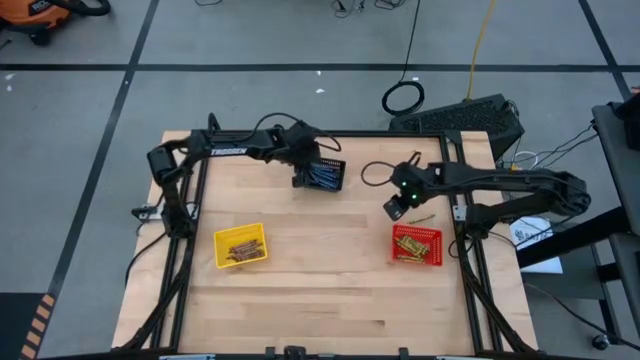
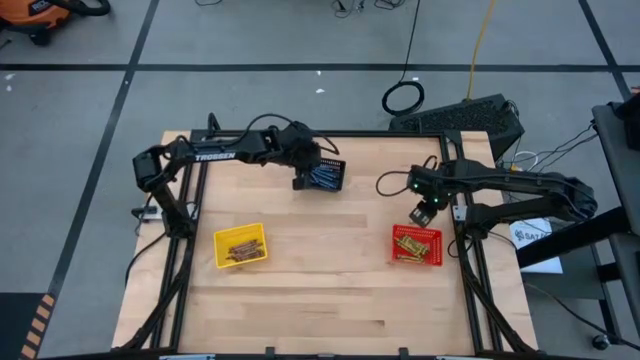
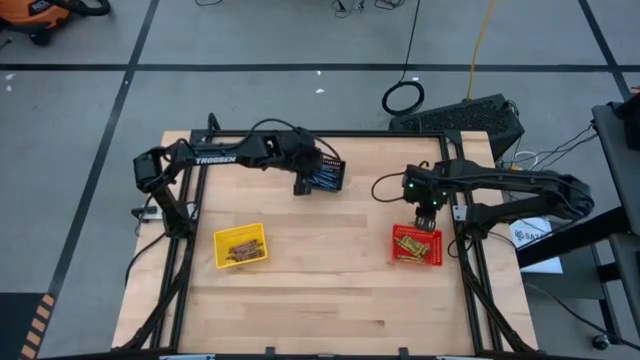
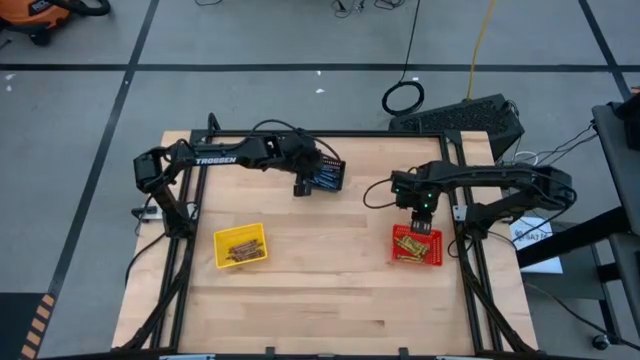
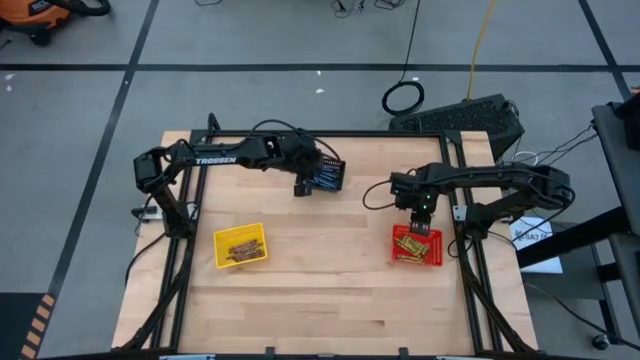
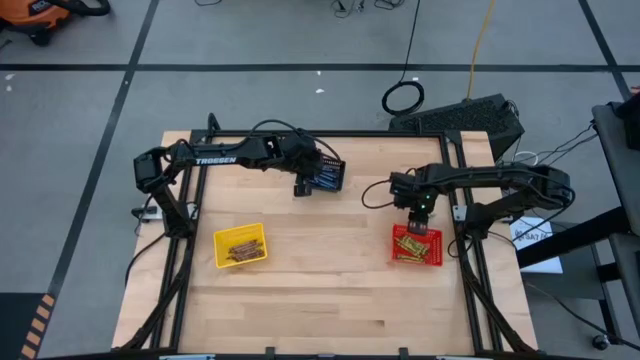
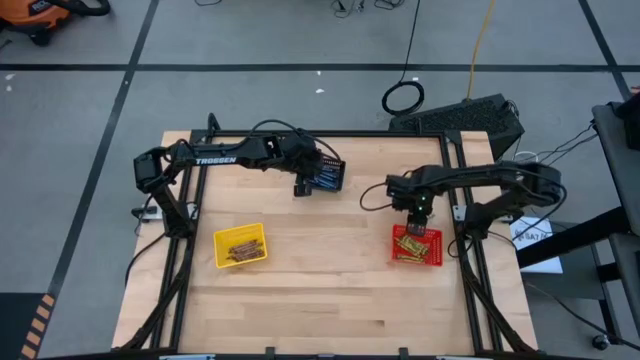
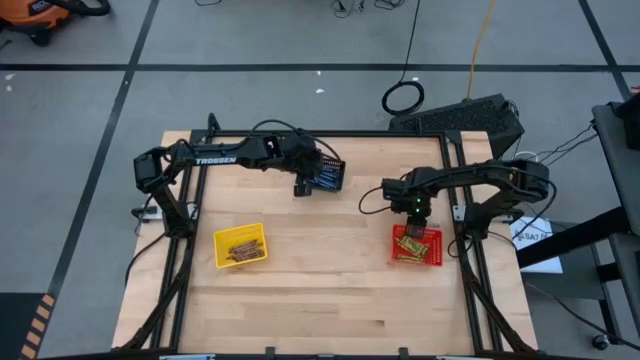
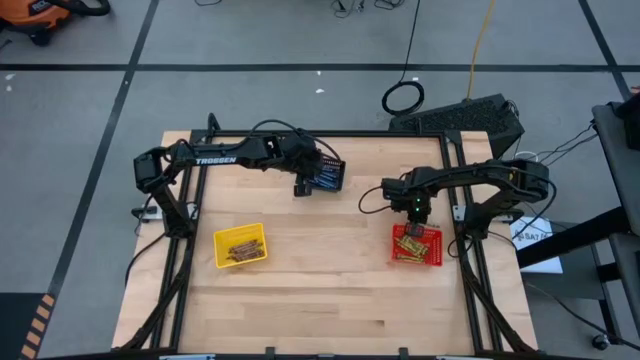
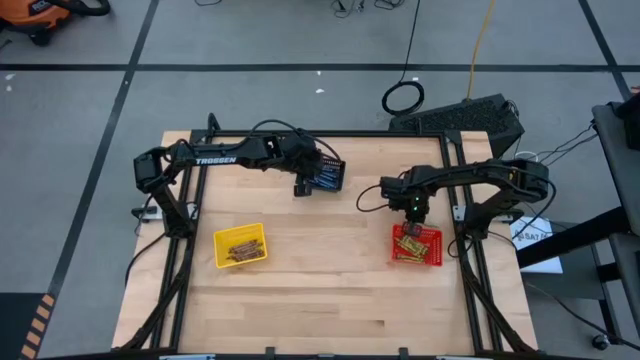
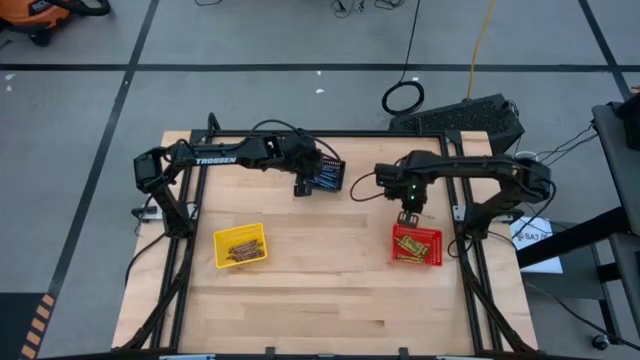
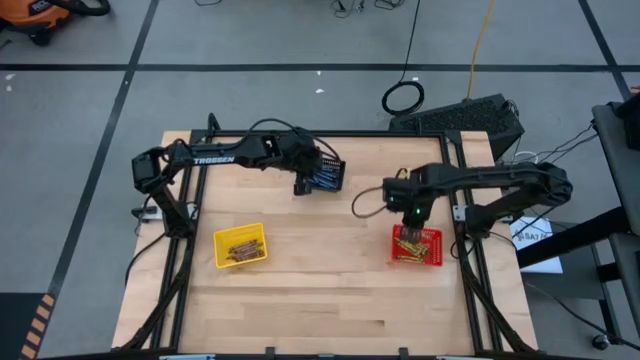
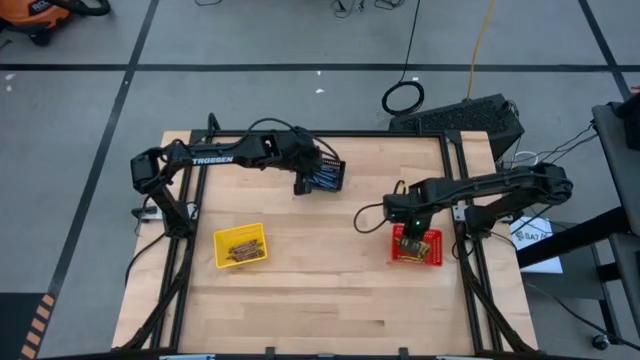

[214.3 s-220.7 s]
Task: Sort crayons
Put the green crayon into the red bin

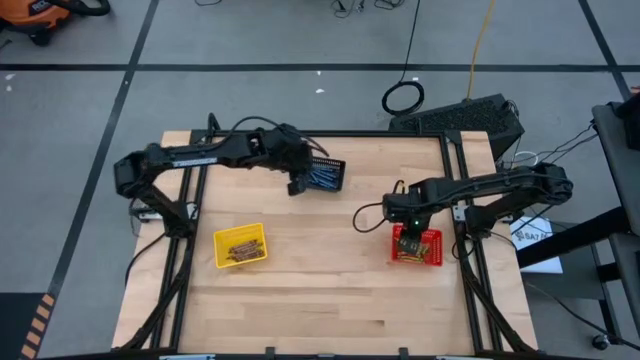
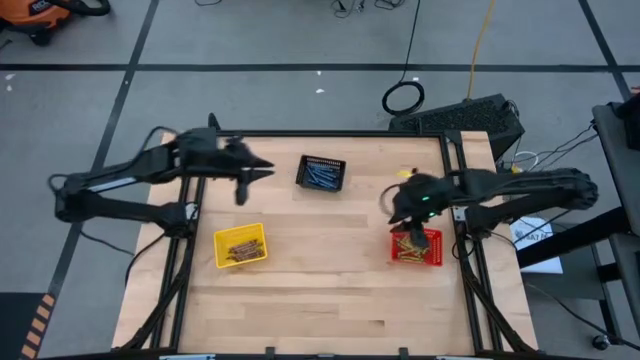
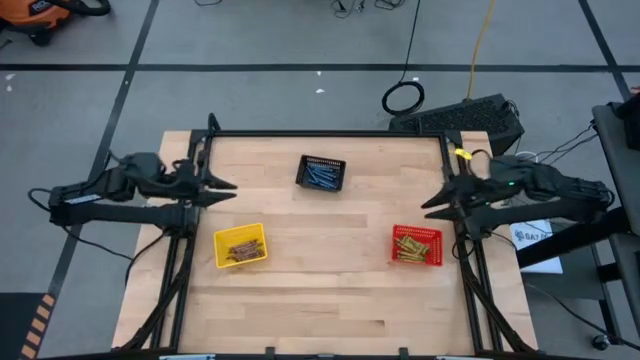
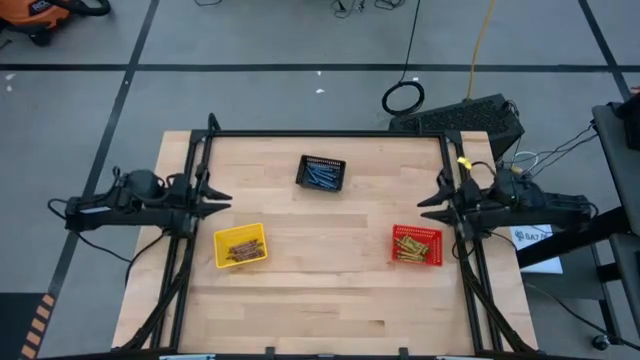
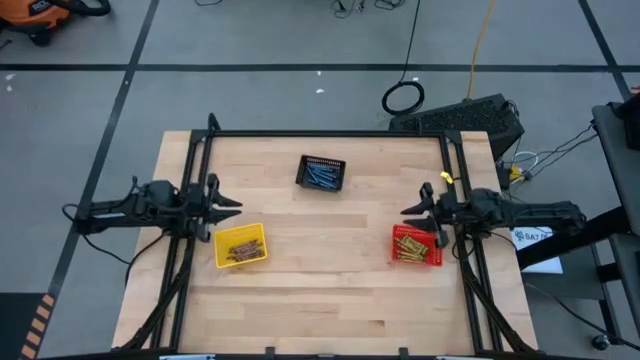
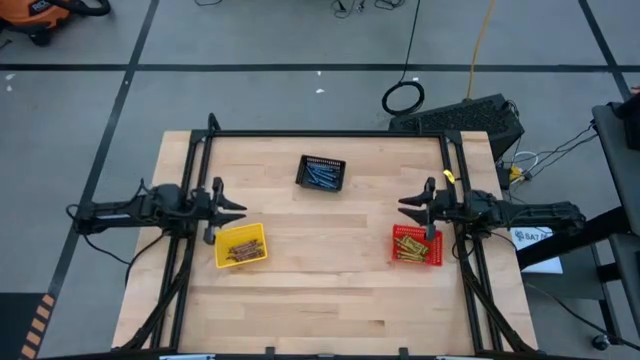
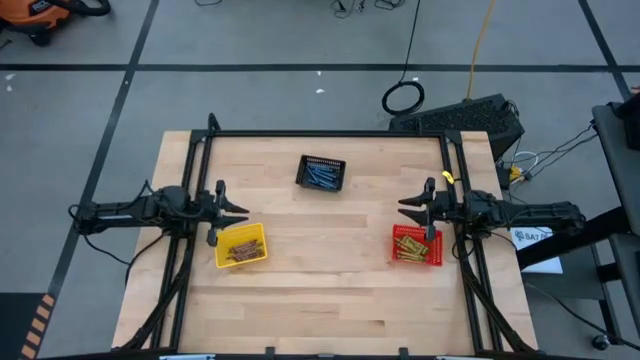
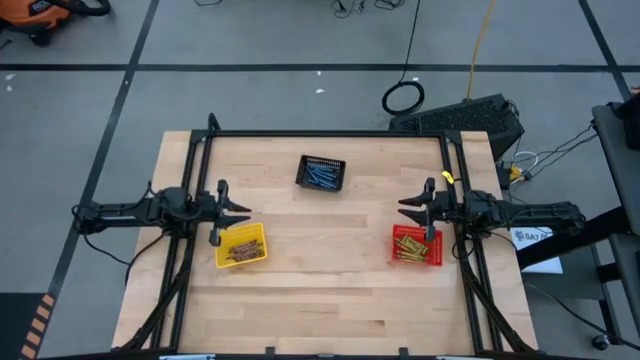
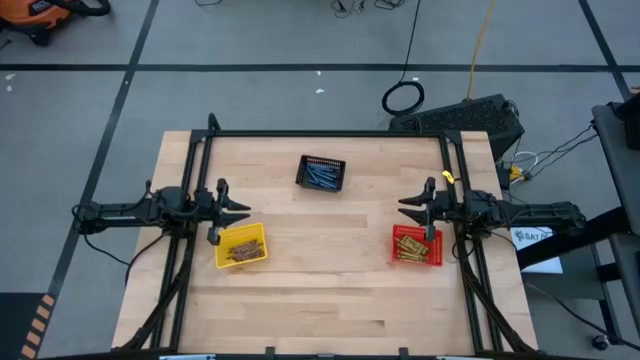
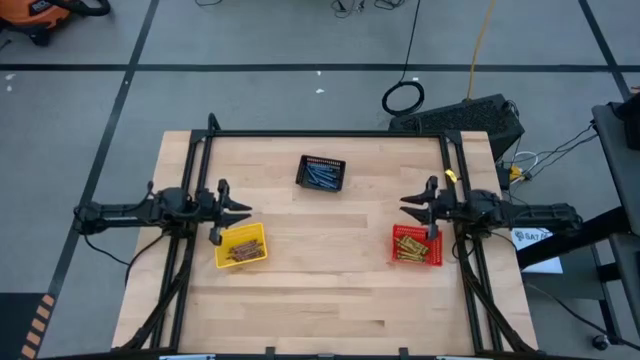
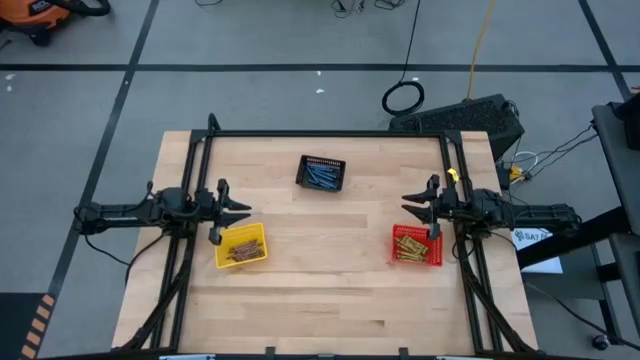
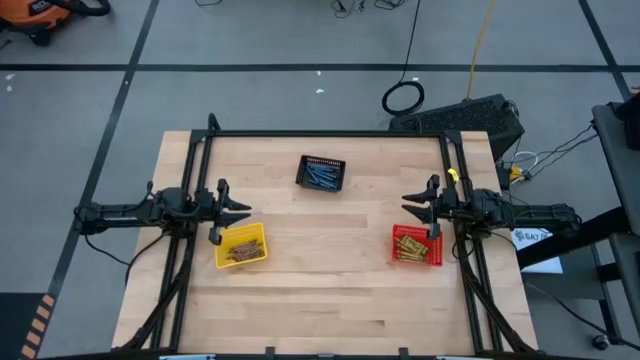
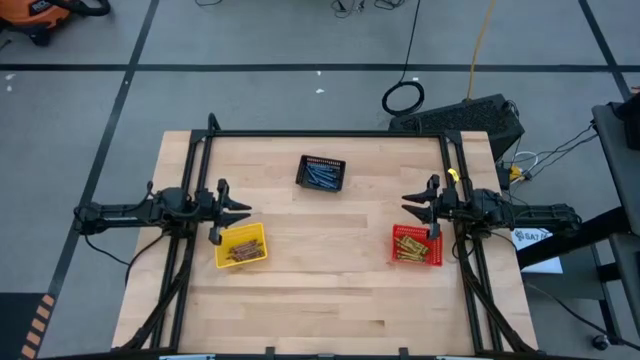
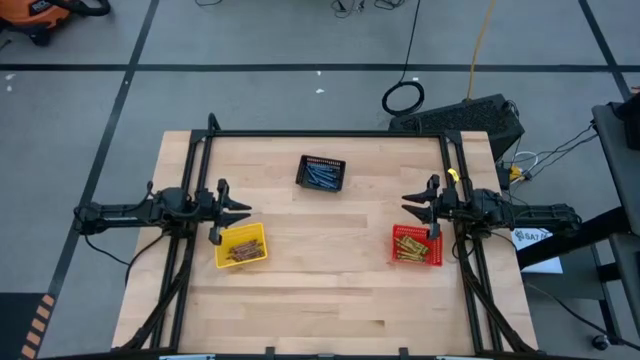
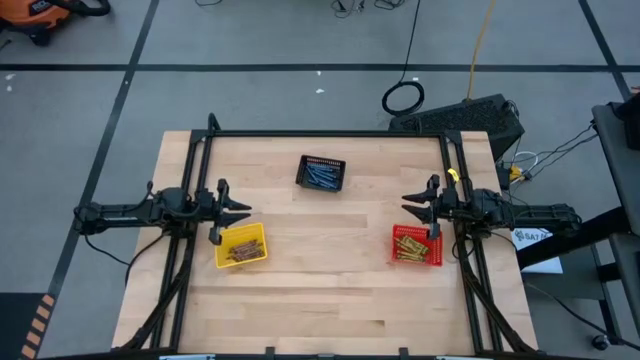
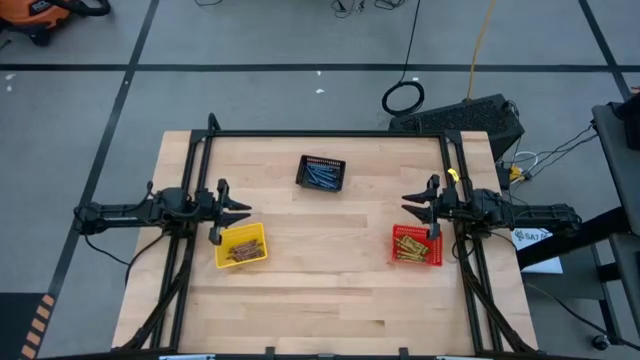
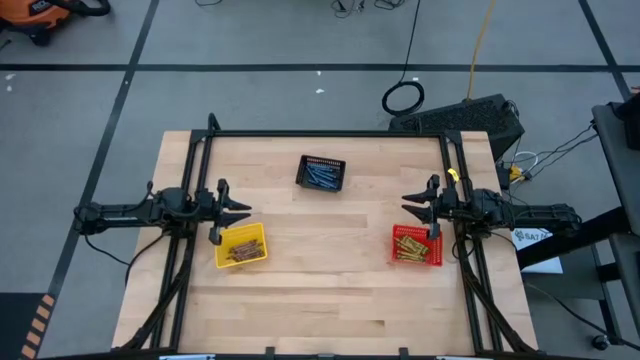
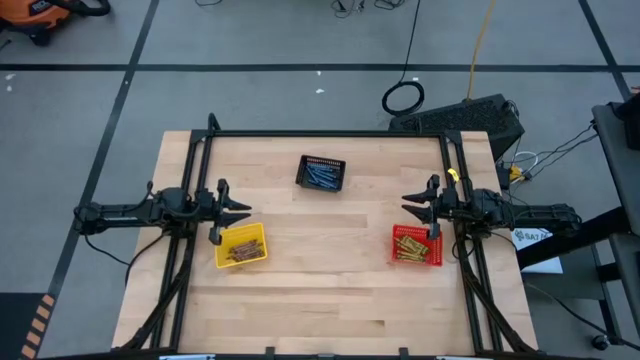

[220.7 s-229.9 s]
Return to Home Position

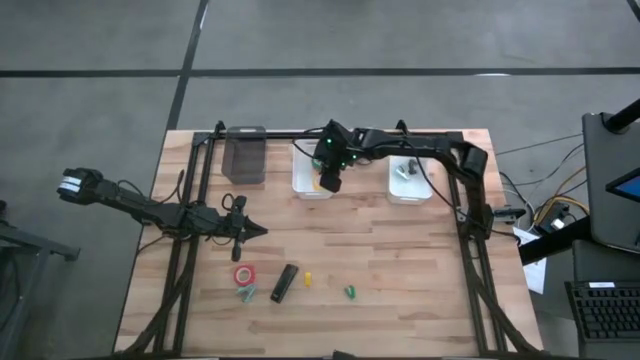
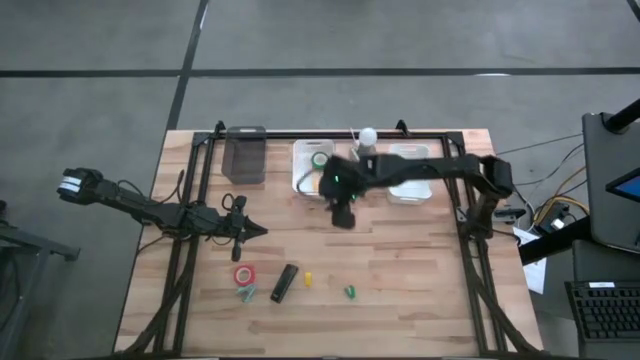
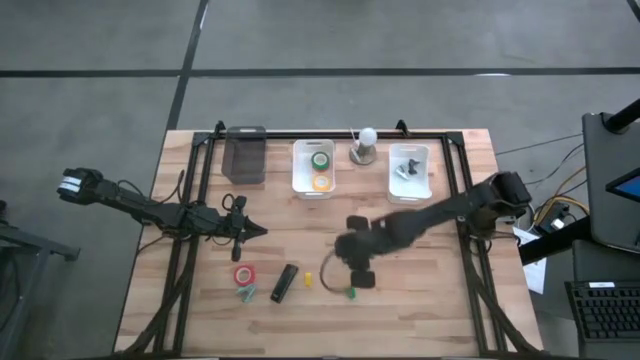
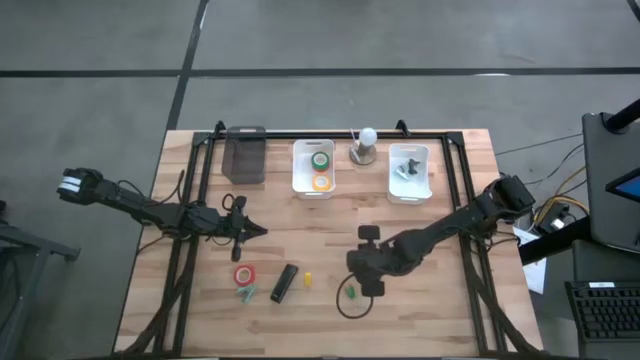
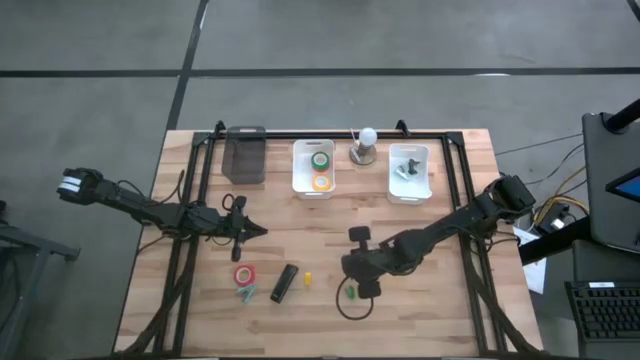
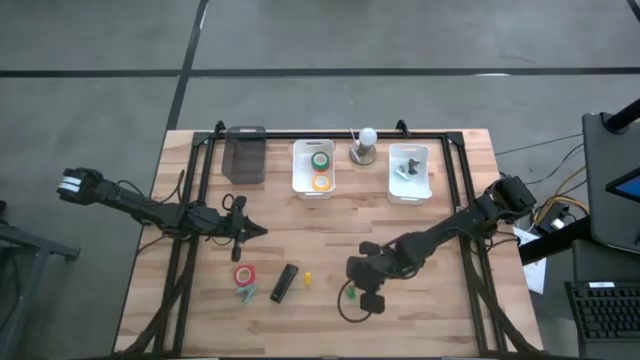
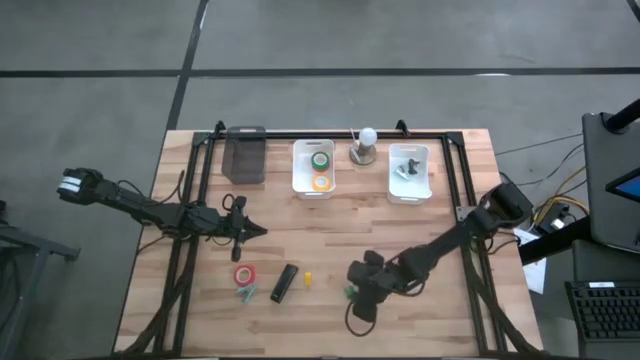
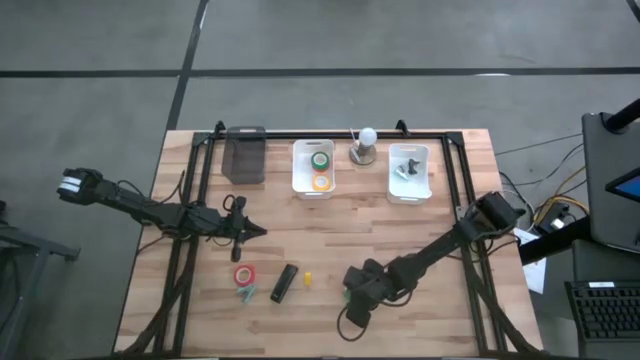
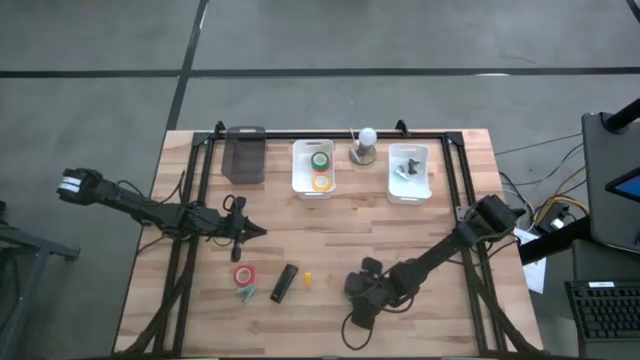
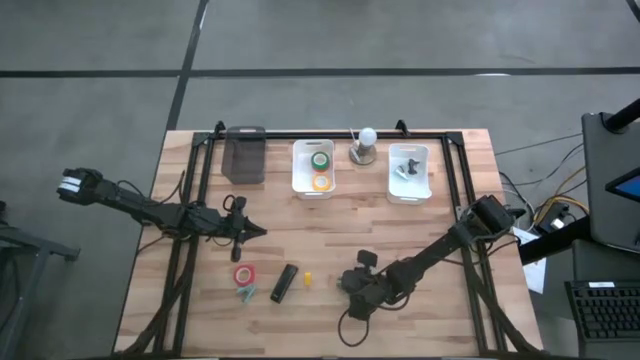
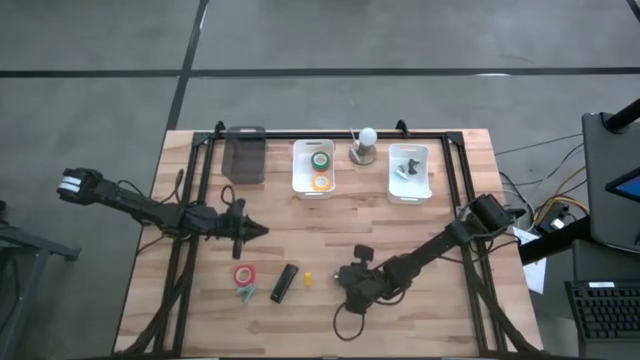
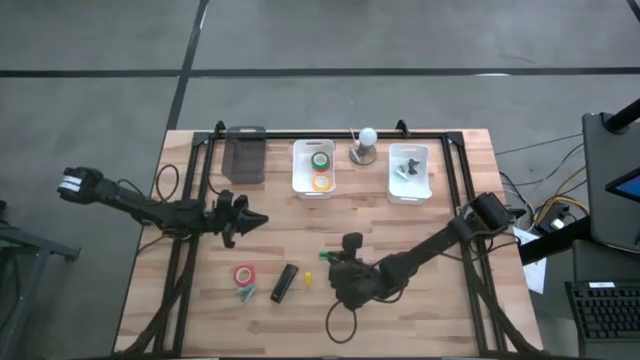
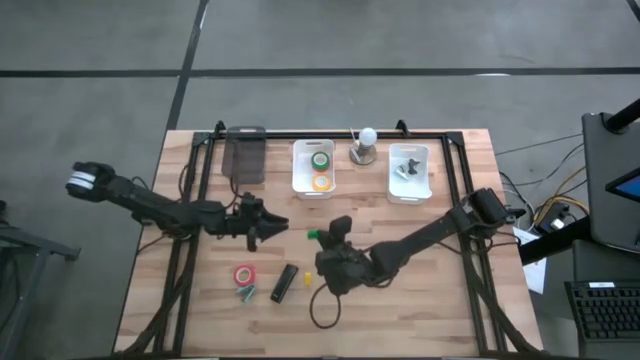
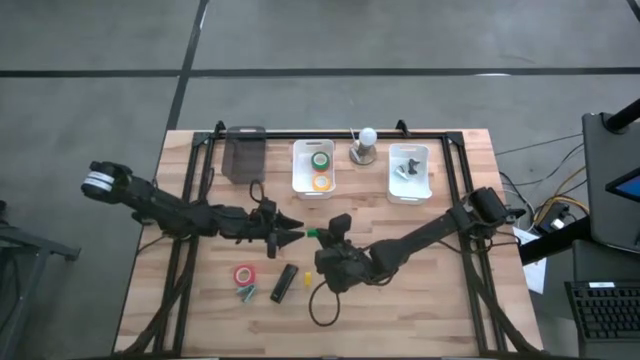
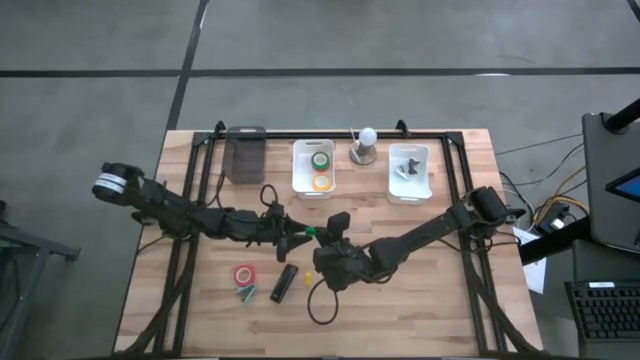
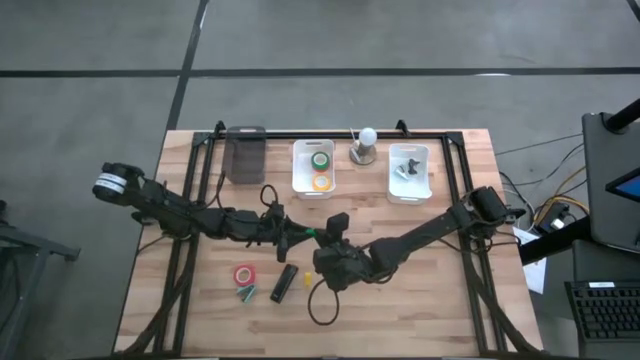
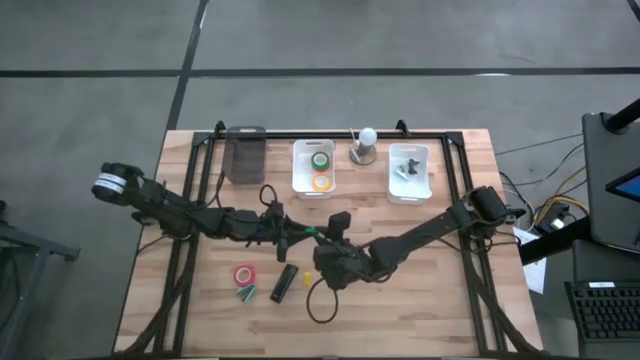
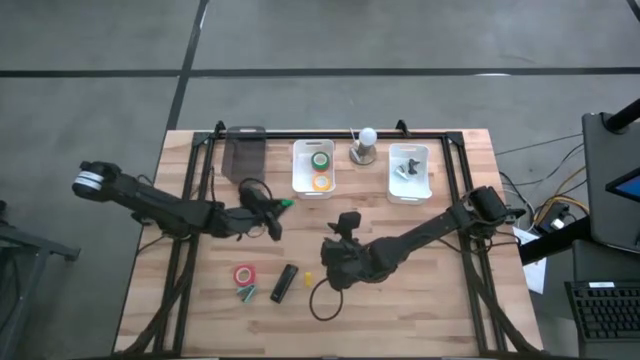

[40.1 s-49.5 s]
Task: Pick and place Stapler, Stapler remover, tape
Put the green stapler into the black bin
